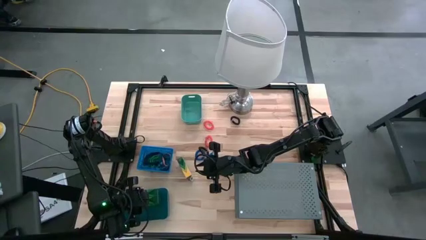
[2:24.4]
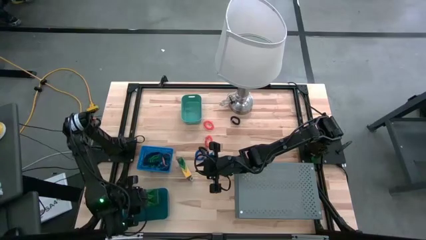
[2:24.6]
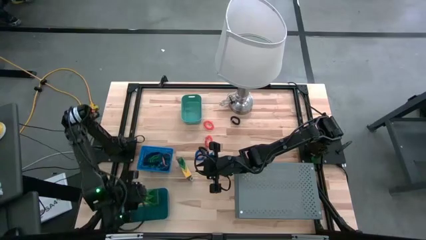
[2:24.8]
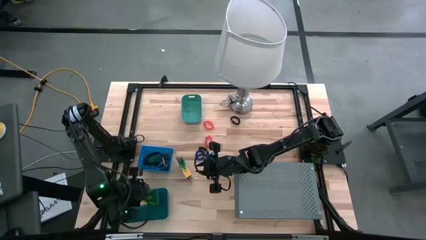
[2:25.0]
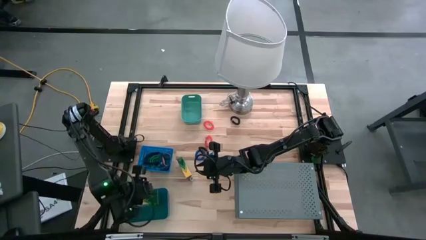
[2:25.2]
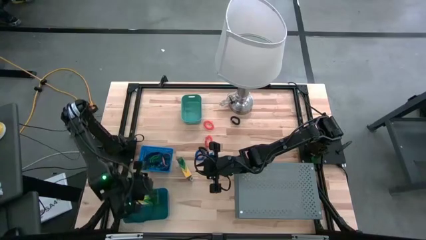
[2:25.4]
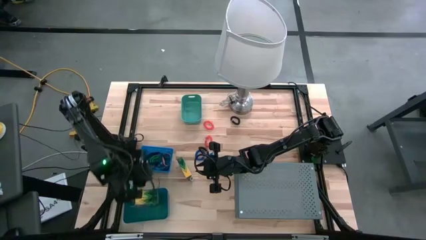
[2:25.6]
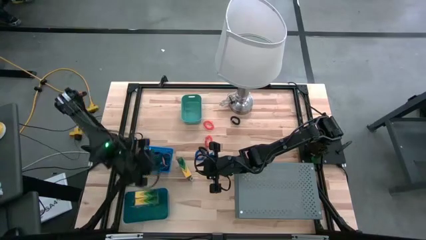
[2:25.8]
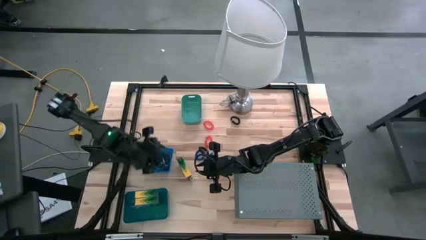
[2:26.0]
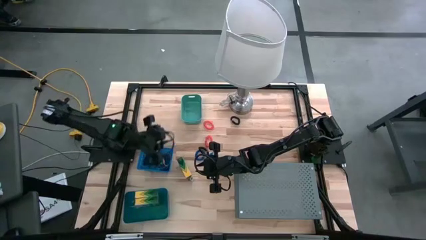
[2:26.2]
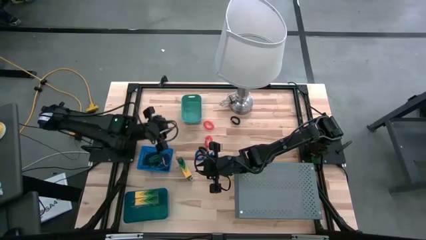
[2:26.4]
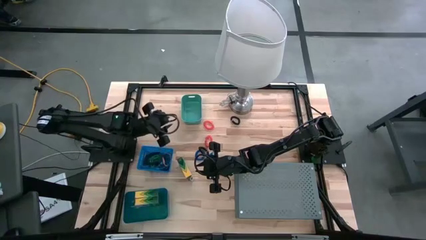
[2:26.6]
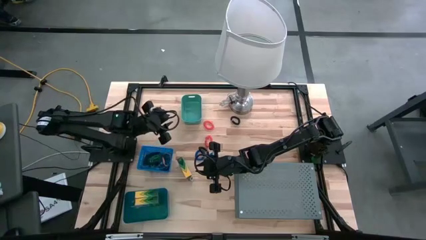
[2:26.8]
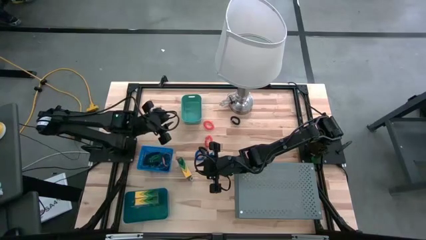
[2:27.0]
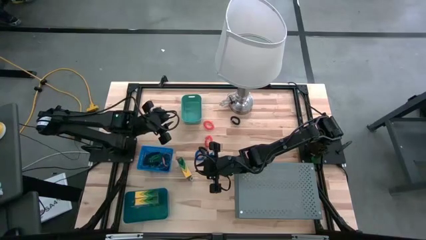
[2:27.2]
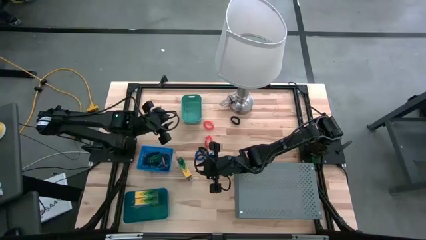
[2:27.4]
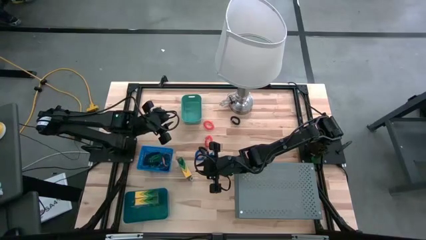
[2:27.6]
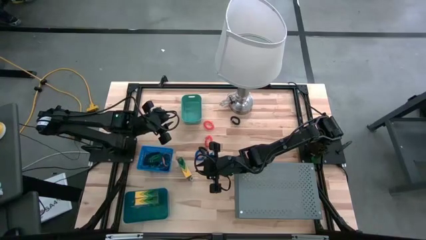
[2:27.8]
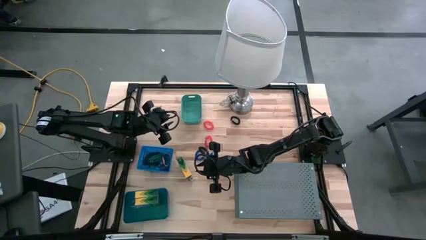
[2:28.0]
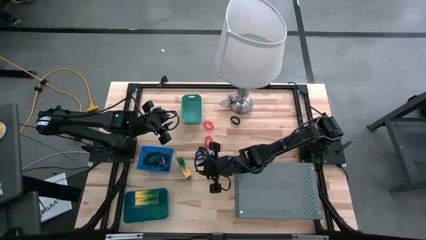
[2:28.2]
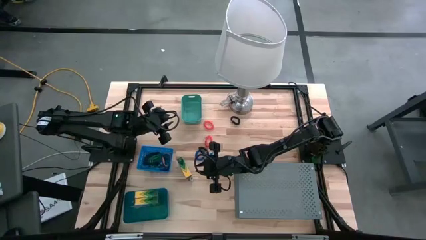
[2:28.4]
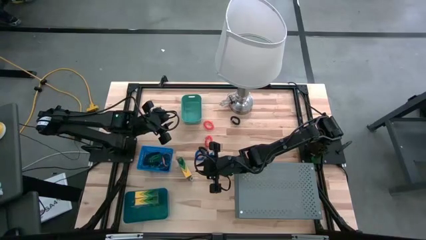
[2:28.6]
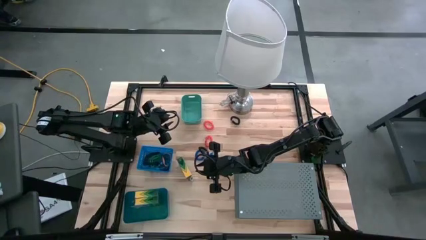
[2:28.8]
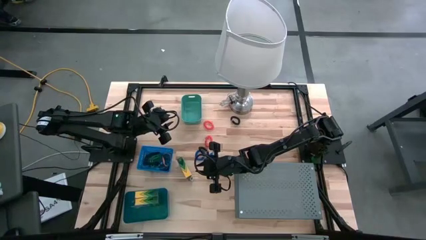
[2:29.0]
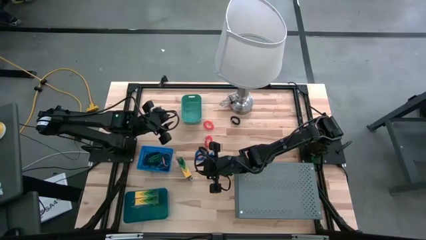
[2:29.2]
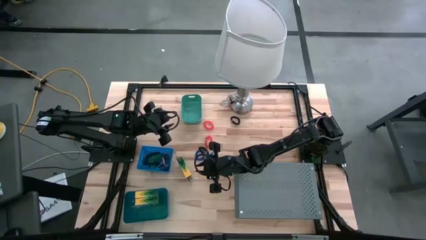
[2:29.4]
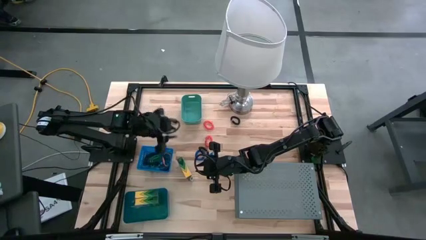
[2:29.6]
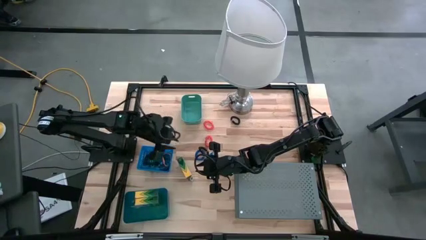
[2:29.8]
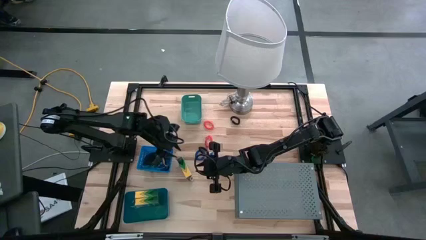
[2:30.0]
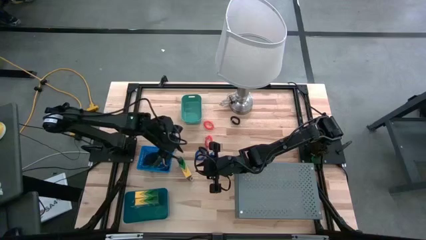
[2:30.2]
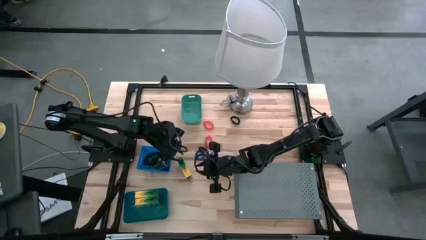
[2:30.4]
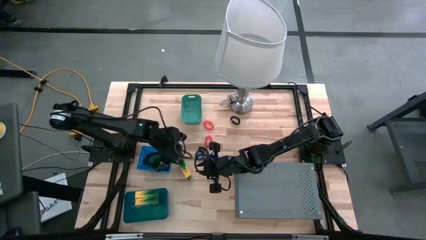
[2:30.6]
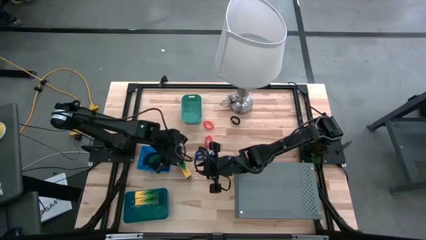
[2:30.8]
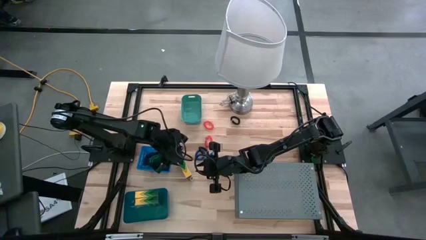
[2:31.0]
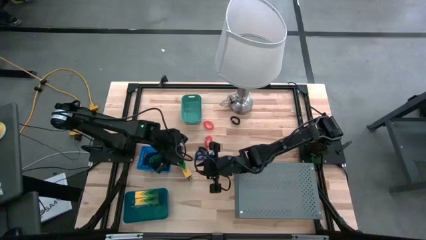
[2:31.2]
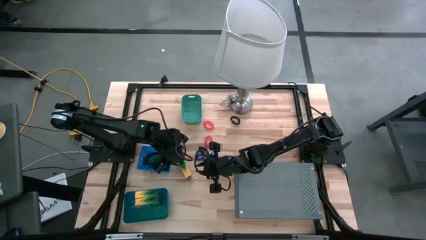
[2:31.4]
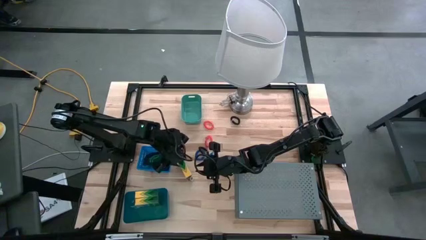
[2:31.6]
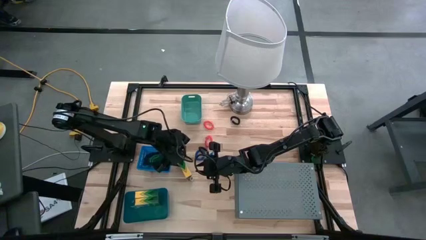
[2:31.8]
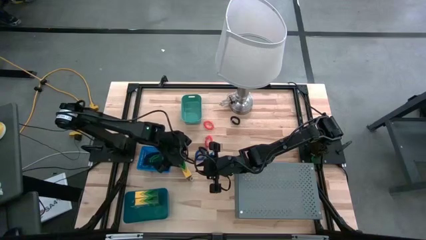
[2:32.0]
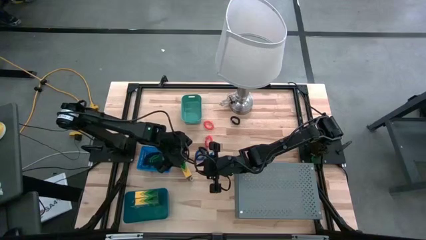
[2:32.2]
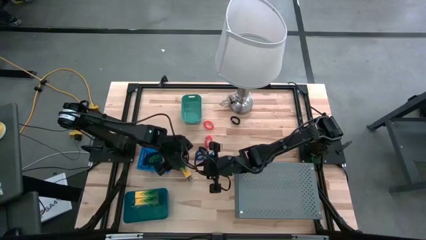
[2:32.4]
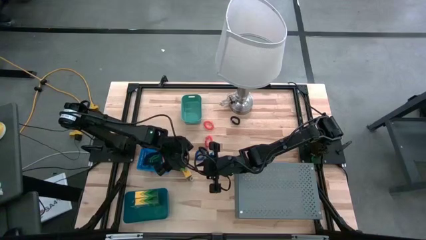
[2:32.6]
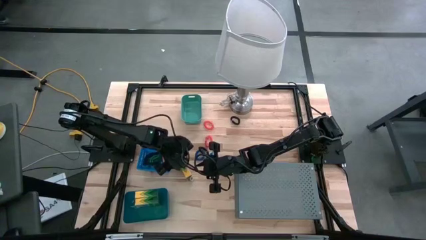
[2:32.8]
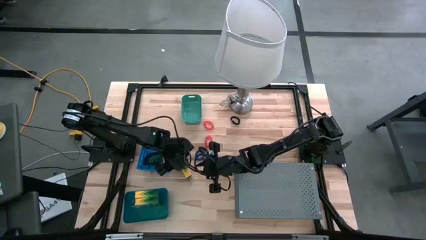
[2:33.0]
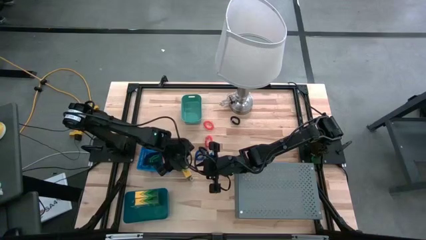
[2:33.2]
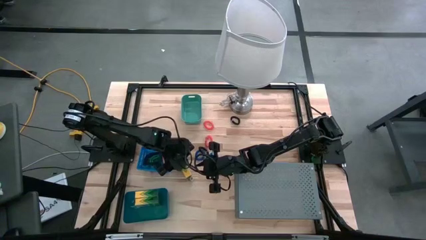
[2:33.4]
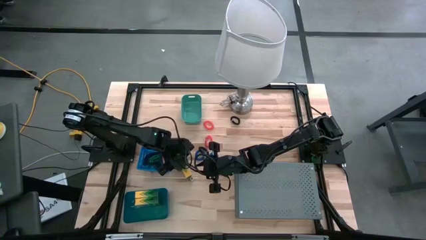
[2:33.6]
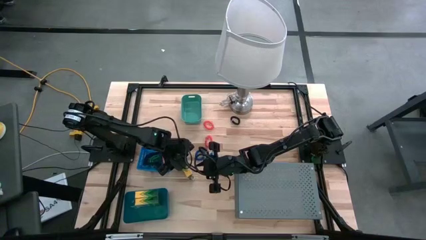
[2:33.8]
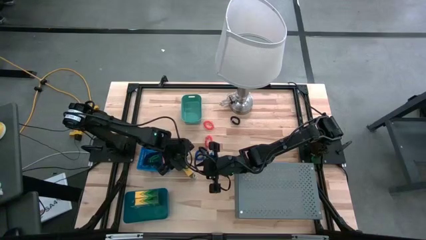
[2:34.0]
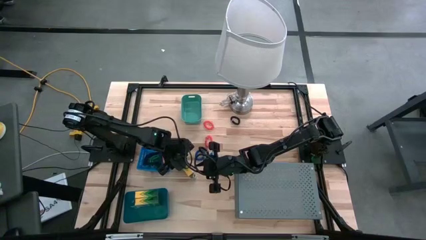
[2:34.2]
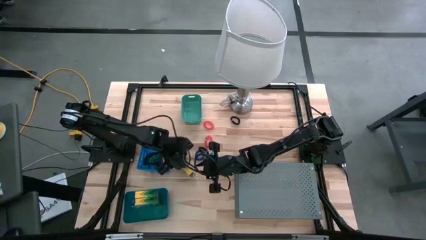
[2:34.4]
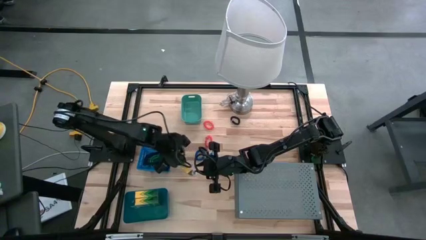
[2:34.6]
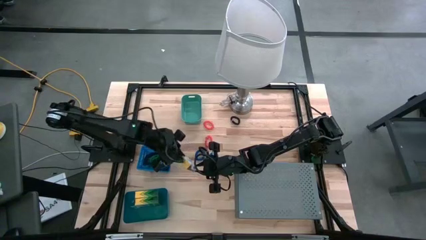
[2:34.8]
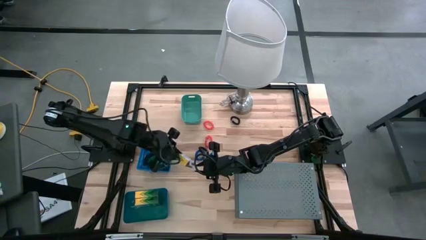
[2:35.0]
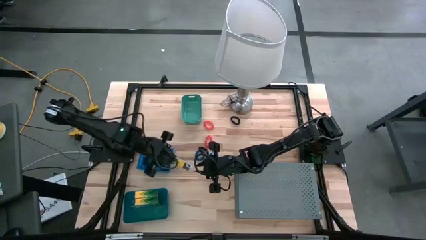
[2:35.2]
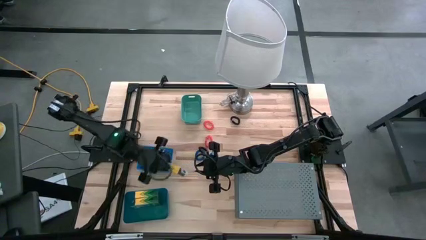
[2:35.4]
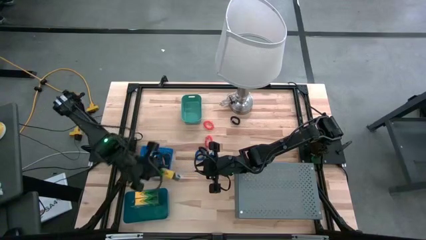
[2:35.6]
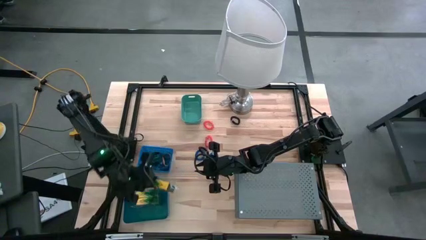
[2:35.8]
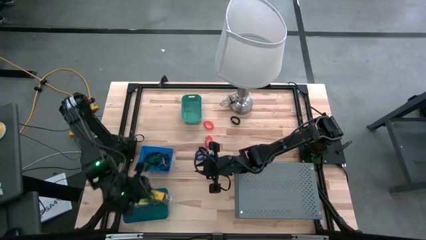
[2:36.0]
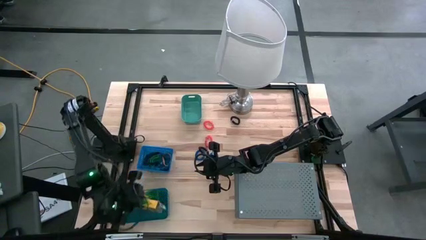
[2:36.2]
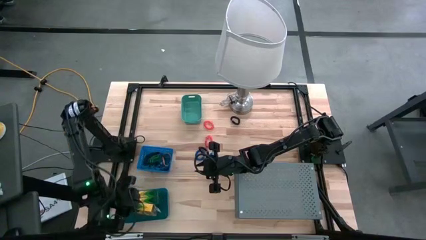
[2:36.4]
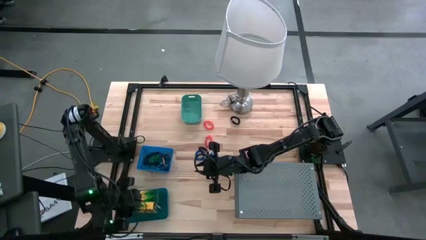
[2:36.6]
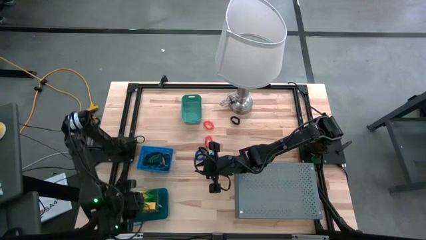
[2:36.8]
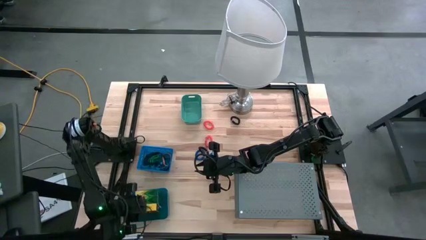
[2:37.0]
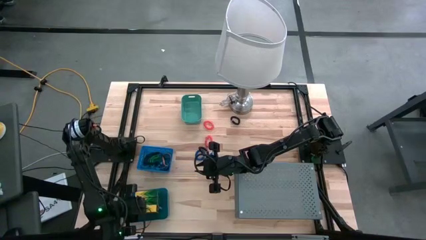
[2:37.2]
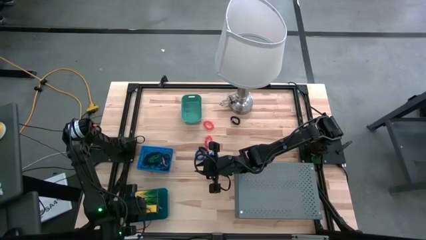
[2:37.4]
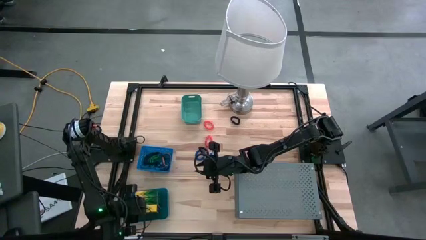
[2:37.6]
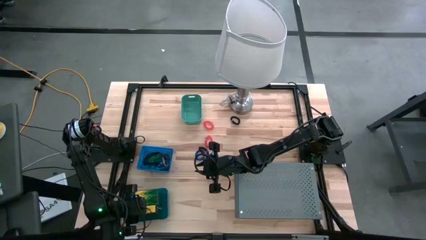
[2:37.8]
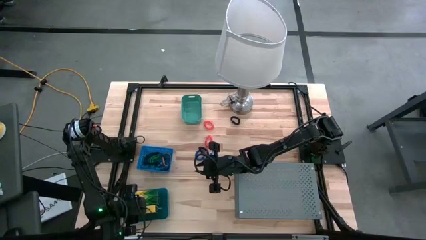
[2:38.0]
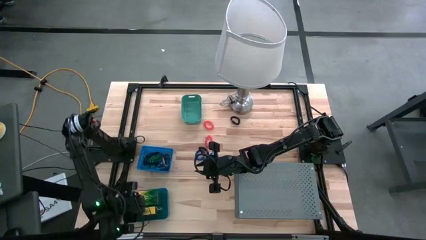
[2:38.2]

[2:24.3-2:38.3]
Task: Pick & Place Office Desk Supplies
Put the pack of crayons into the bottom blue bin

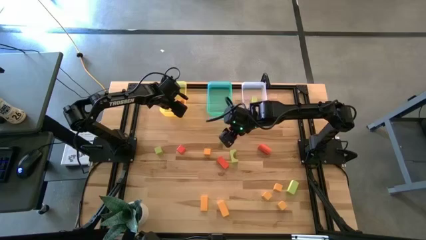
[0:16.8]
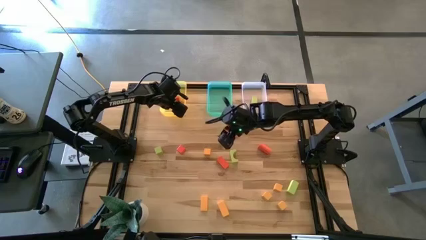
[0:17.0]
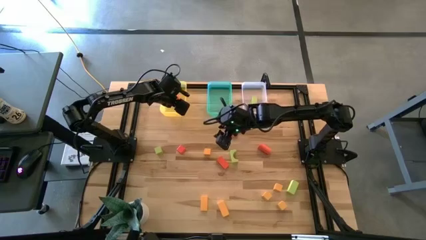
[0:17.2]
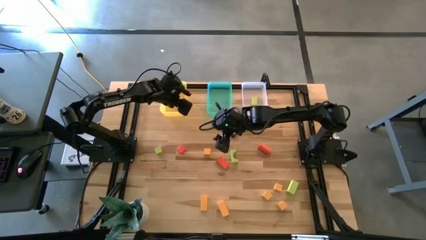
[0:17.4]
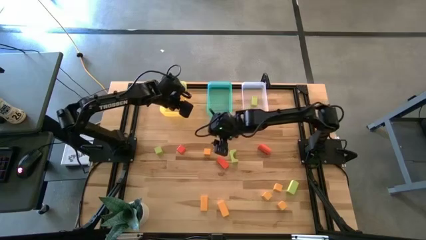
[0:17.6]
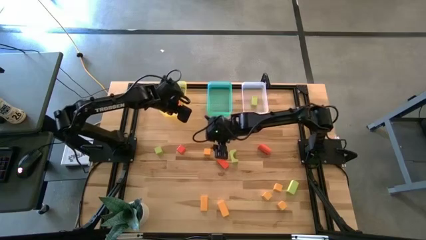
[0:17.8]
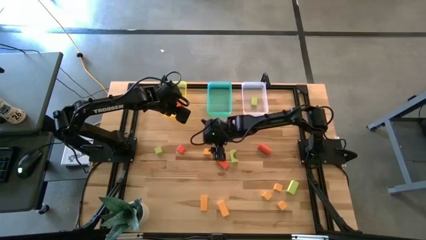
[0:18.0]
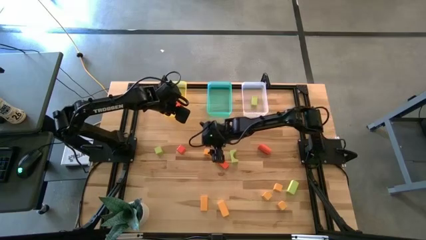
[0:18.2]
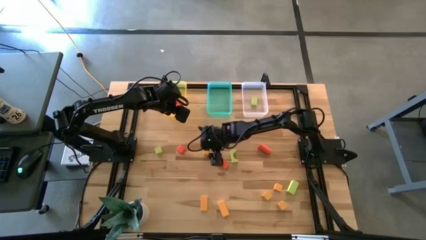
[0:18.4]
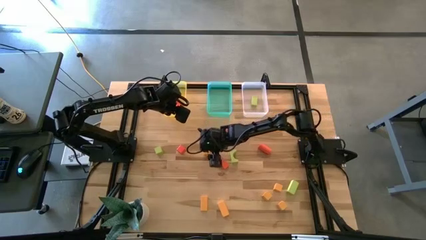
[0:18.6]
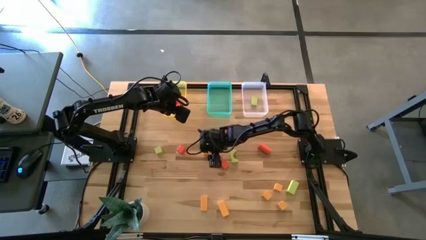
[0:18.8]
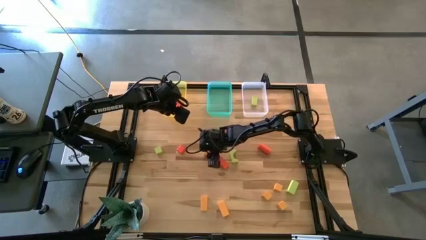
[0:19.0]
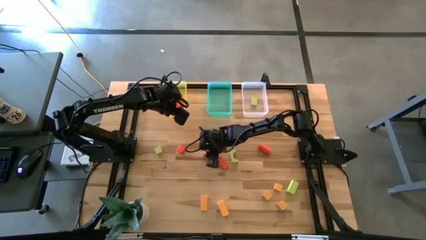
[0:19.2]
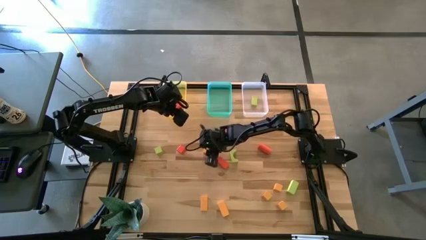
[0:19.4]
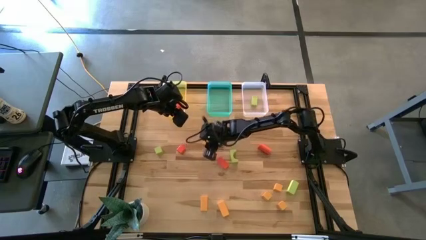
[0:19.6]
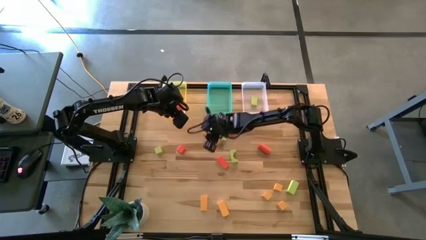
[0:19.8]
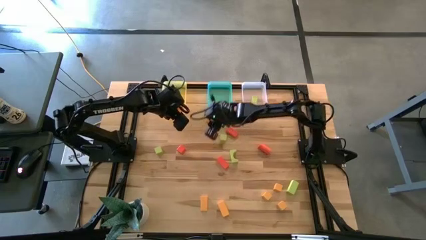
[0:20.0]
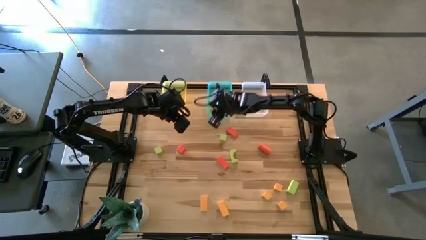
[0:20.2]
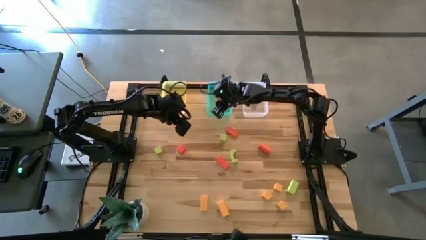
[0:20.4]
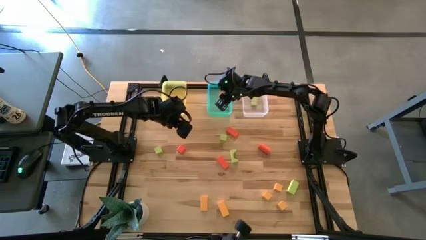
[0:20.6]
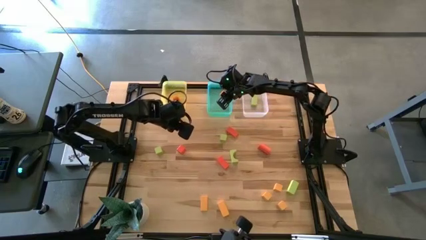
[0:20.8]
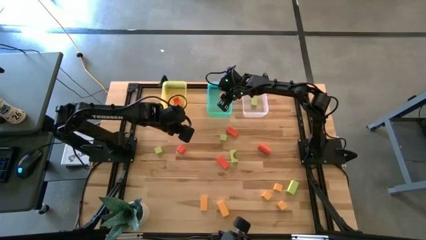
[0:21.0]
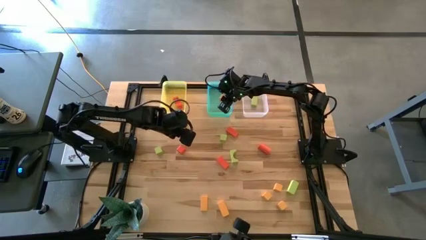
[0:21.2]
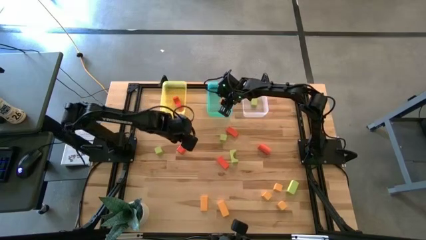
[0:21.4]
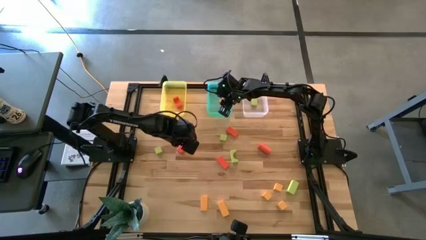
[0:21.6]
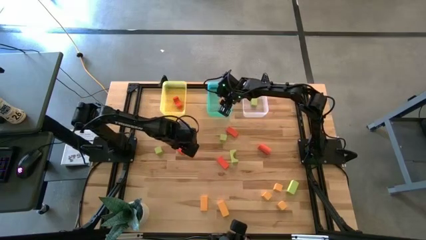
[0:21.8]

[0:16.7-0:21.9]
Task: Sort & place blocks by color
Put the yellow block into the green bin
